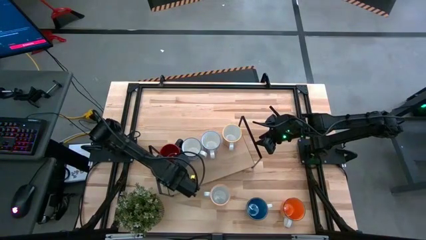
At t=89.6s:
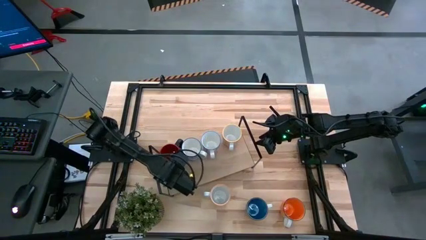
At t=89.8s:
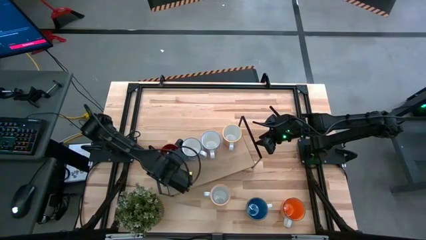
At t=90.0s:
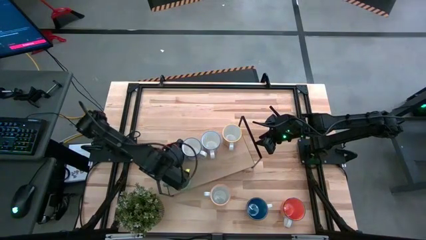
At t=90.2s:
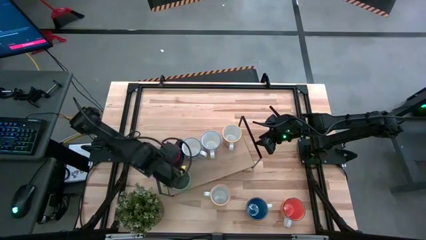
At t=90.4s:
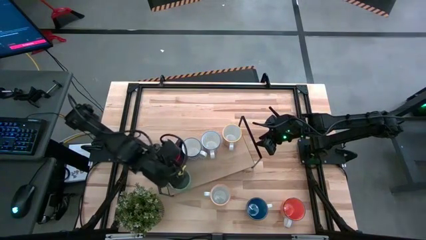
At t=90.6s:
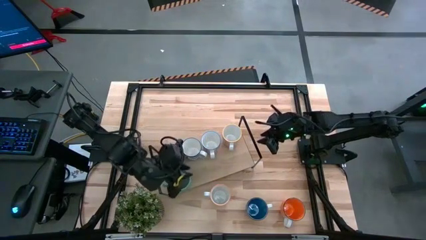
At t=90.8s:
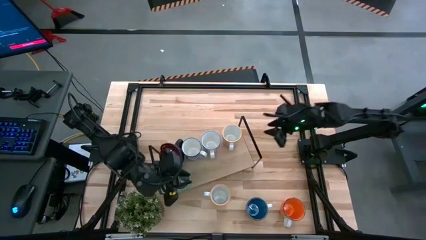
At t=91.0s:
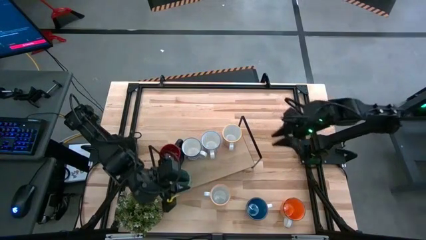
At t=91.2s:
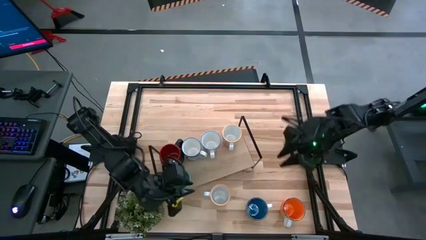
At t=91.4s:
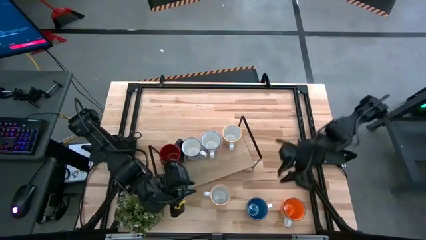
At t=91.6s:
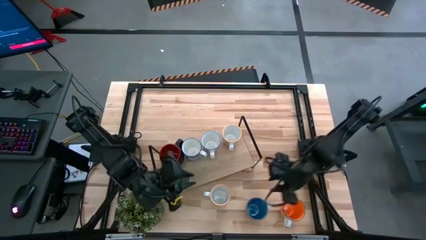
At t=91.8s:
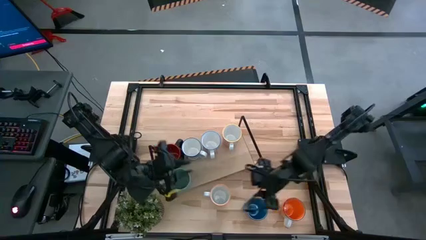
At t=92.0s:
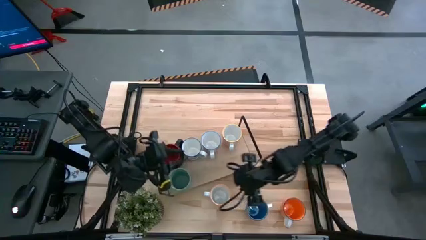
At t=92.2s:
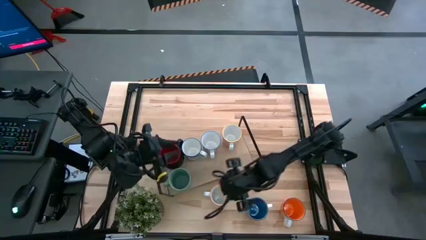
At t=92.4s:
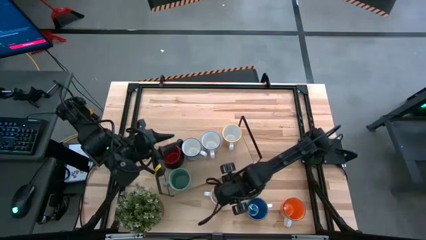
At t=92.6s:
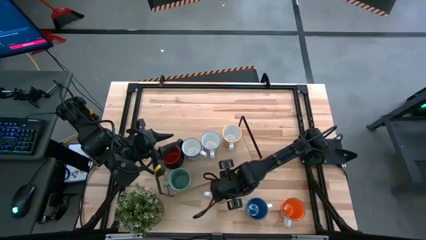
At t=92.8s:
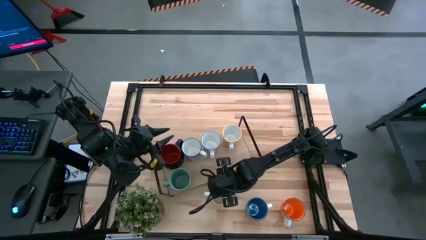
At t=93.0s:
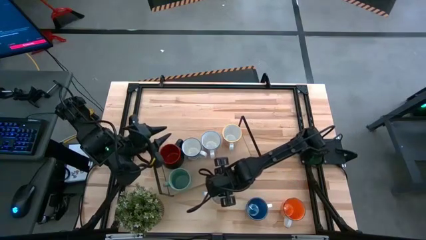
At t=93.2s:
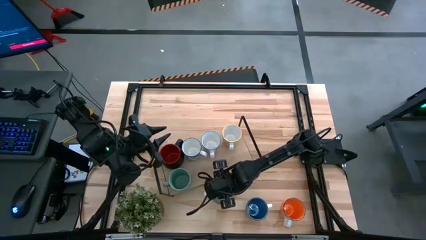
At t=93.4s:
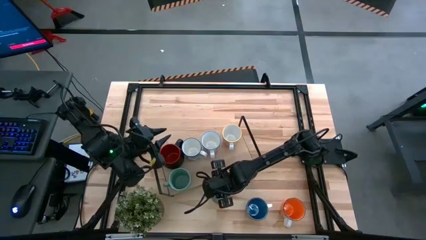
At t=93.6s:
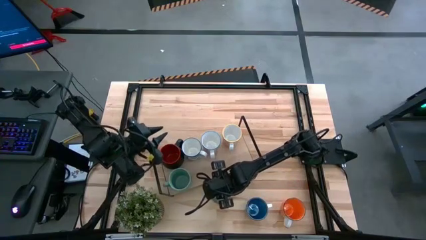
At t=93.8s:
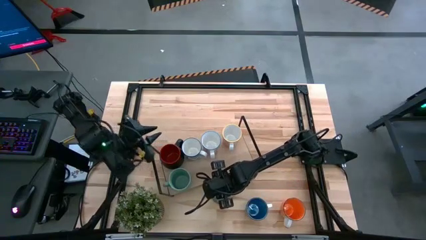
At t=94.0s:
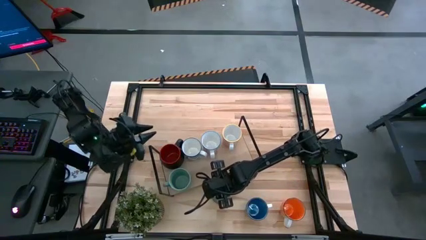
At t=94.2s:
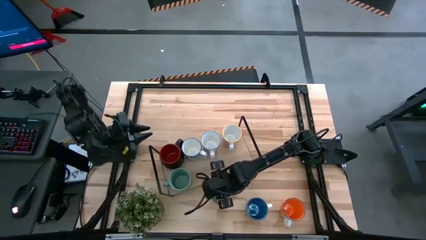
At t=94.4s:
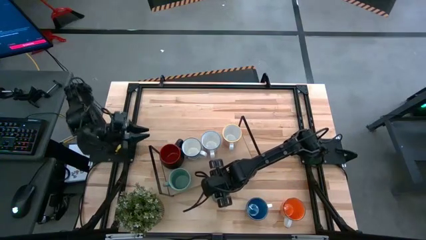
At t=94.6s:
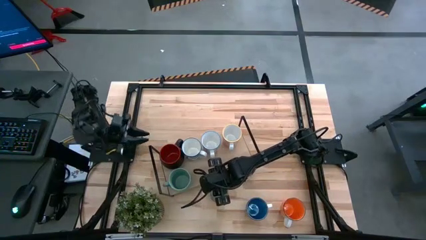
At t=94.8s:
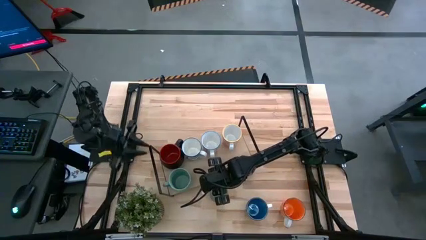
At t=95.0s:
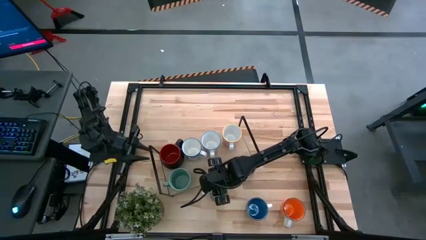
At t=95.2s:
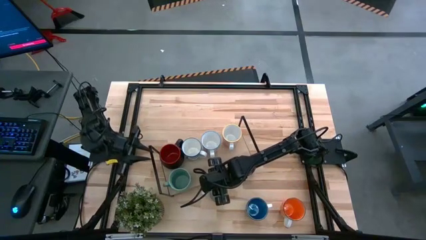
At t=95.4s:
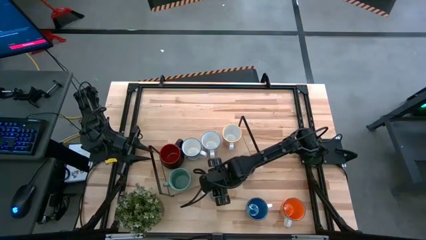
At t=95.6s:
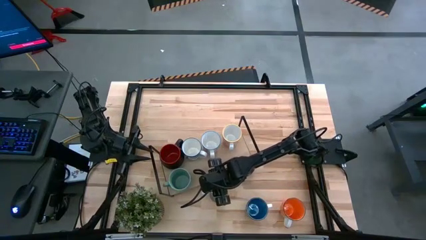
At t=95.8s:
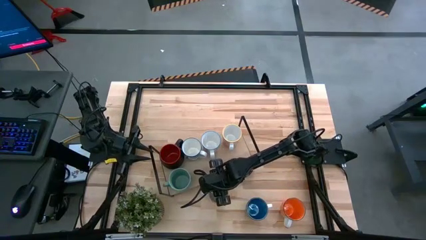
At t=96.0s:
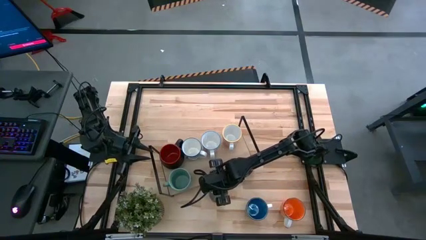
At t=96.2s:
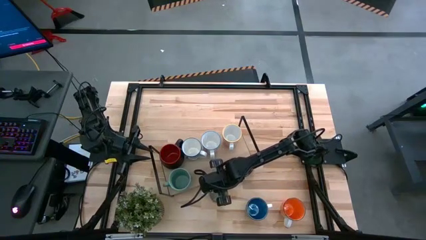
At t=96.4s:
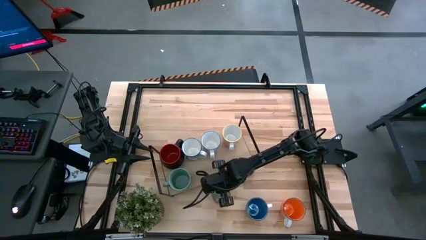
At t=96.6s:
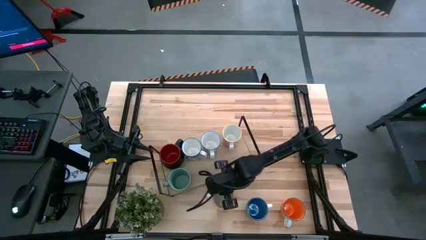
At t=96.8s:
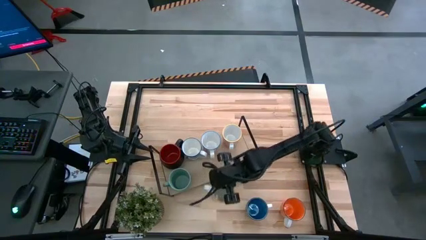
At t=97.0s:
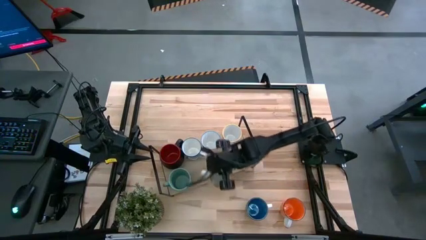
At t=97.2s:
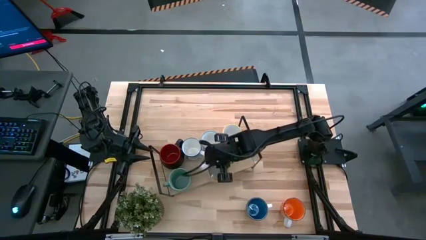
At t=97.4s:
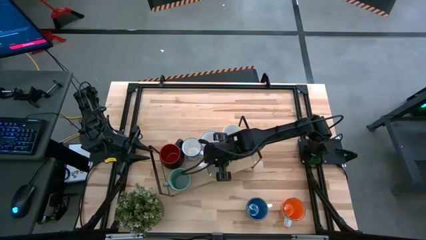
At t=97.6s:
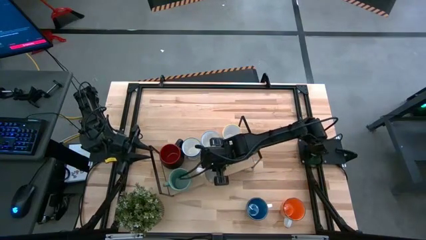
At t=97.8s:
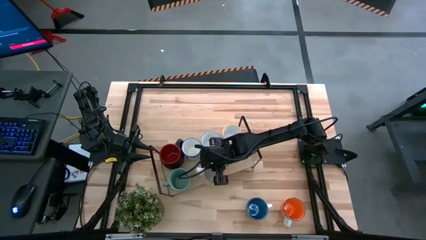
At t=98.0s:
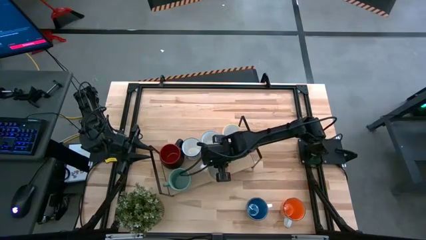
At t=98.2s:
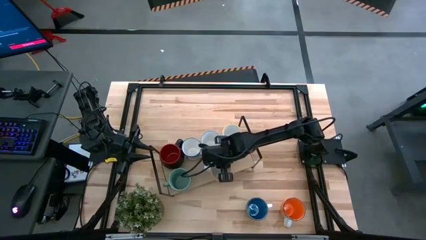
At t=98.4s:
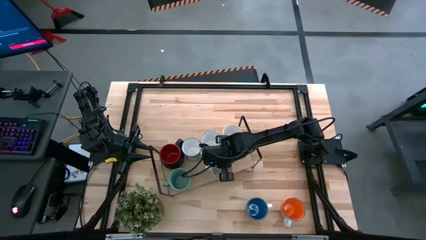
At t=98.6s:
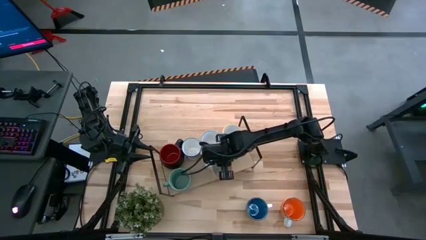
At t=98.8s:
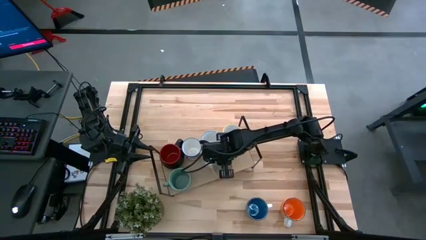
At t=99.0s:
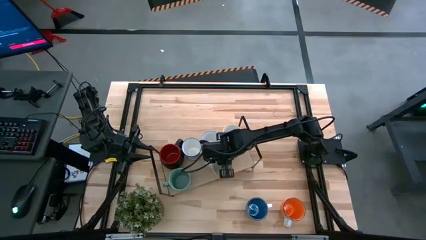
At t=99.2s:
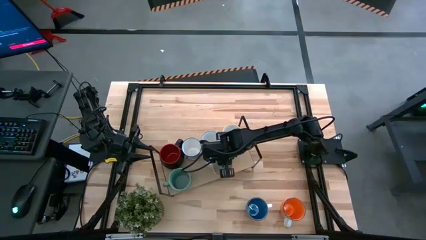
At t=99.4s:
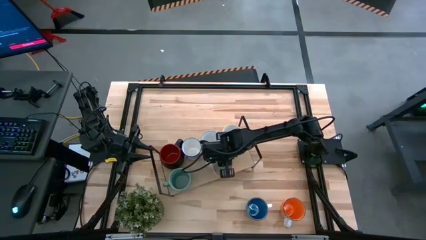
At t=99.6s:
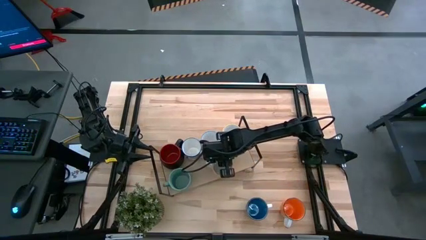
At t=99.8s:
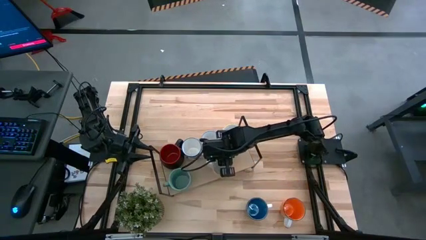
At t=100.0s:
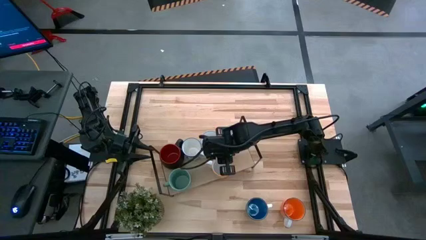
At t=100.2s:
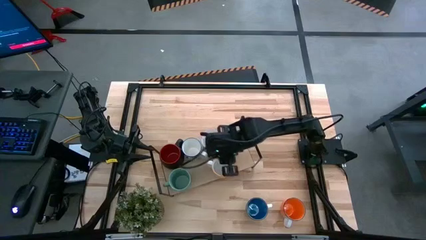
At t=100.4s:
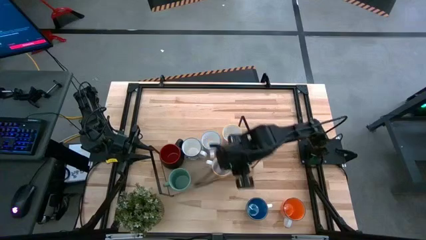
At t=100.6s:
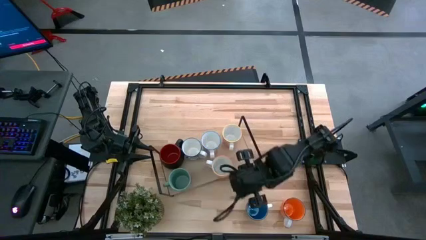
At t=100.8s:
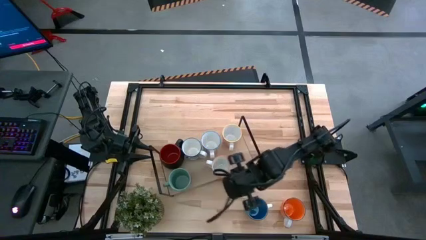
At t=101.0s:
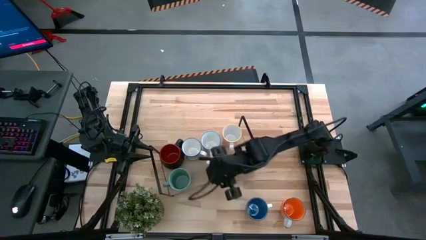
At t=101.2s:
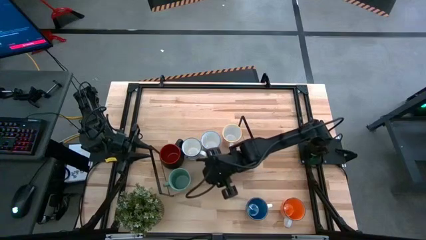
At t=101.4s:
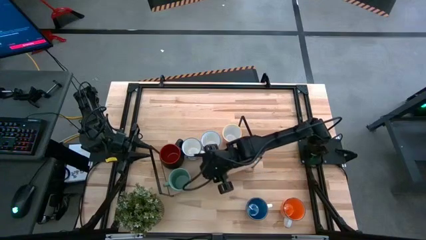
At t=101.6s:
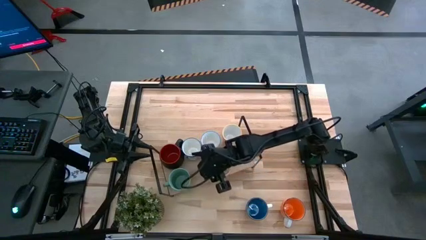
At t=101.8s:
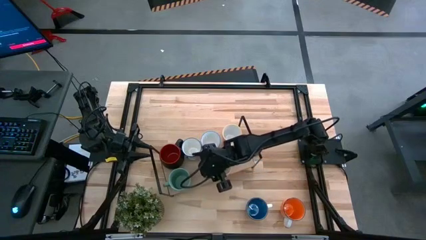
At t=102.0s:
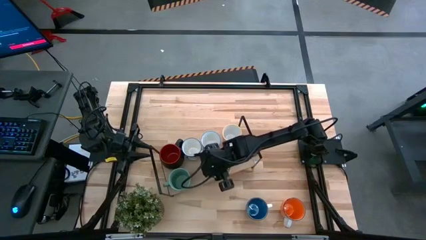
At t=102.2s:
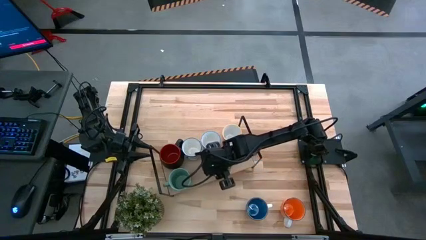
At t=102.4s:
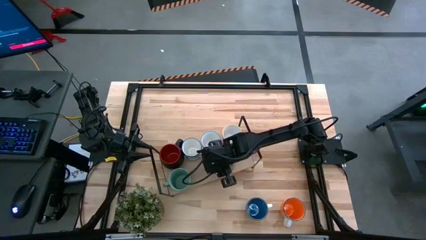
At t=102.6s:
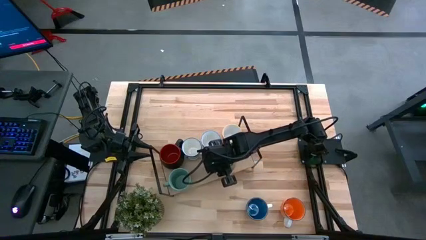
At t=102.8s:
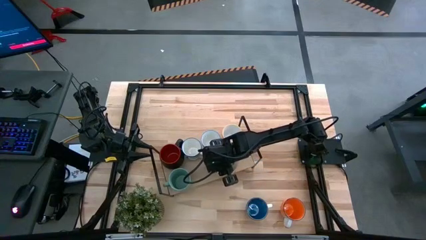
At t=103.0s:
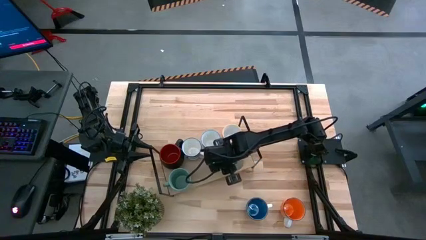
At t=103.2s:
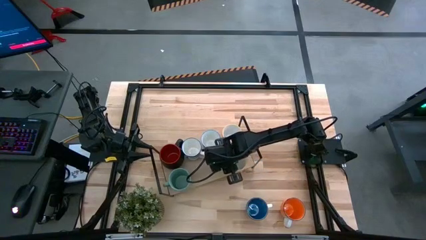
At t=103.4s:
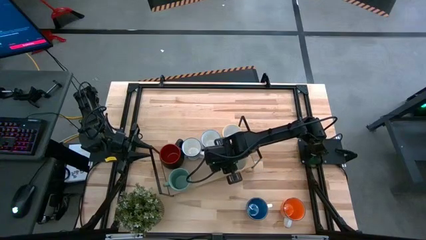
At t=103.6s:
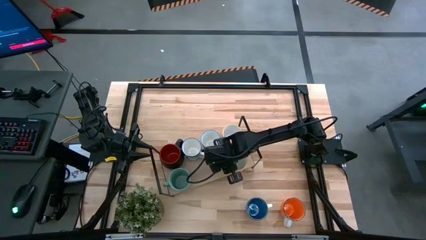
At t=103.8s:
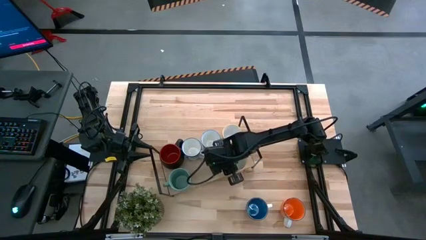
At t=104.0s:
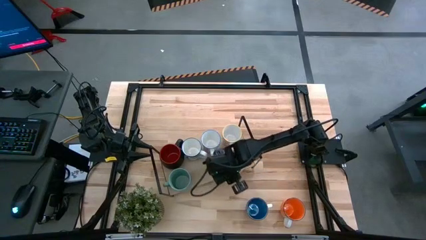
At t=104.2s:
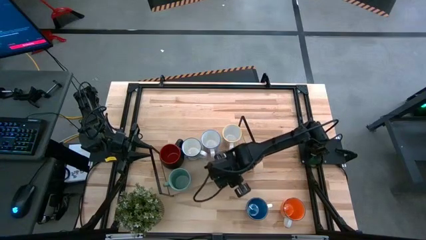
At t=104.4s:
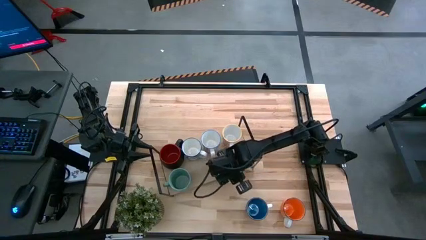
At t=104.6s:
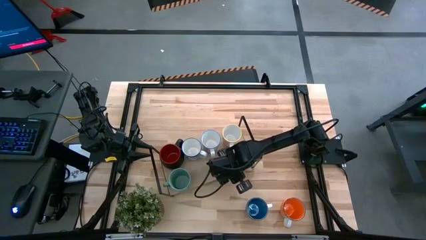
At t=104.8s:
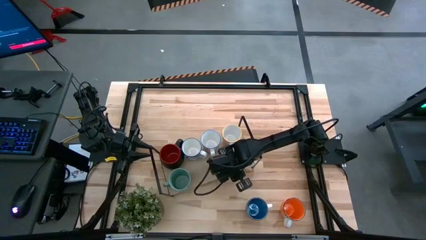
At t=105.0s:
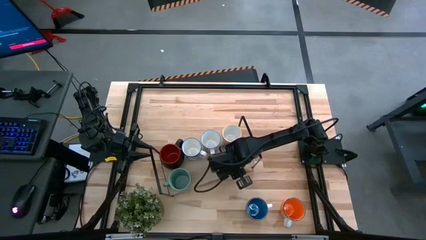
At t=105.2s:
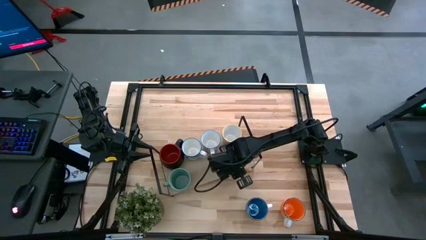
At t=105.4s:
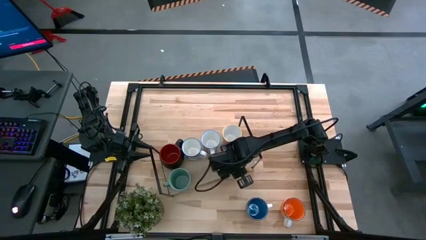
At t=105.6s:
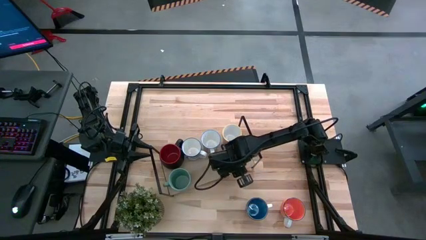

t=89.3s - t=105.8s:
Task: Place coffee mugs
Put the yellow pattern mug on the shelf
